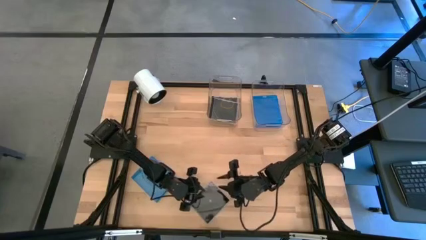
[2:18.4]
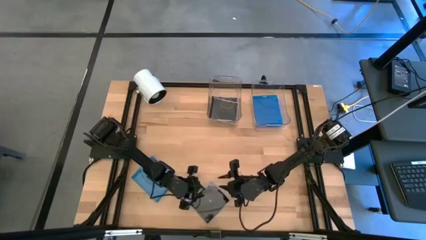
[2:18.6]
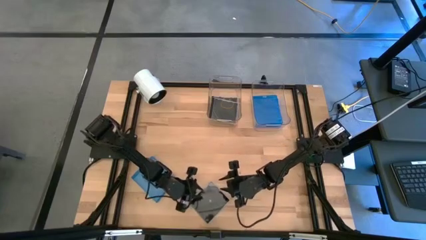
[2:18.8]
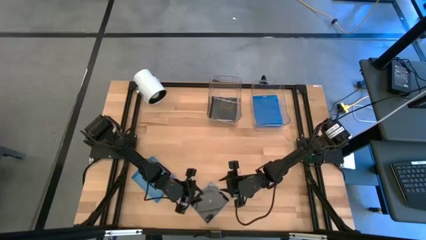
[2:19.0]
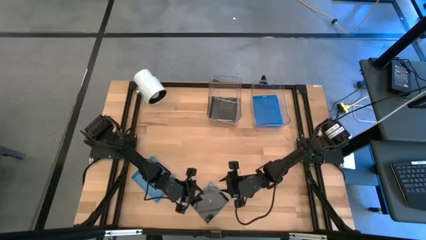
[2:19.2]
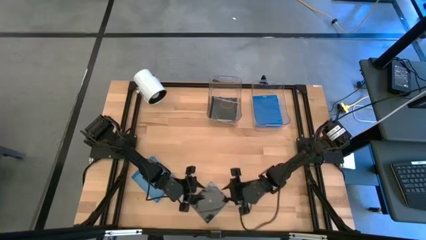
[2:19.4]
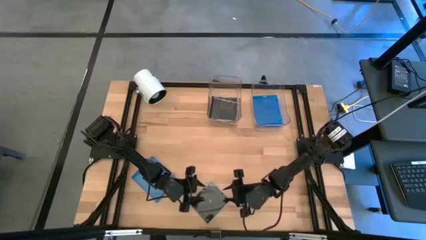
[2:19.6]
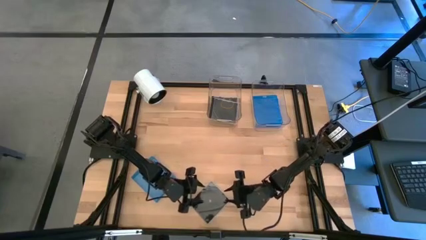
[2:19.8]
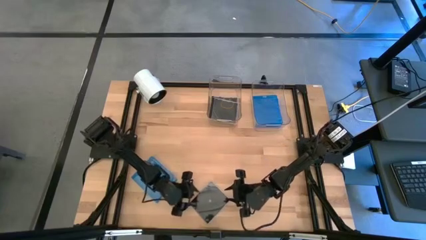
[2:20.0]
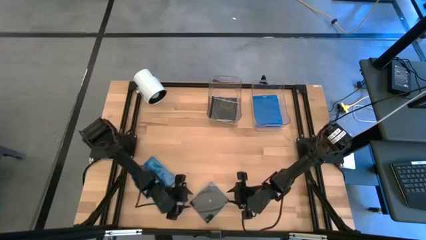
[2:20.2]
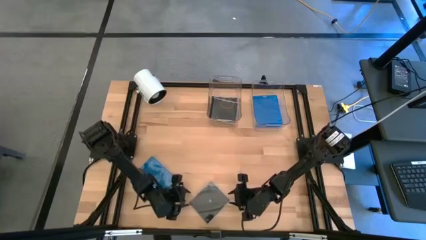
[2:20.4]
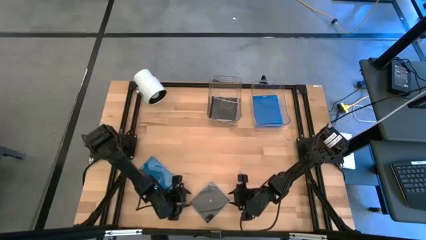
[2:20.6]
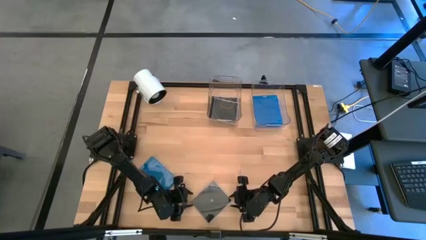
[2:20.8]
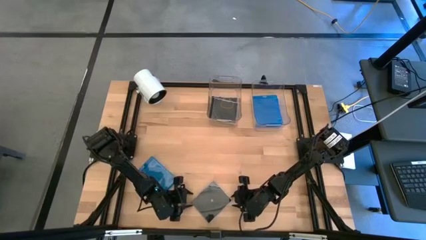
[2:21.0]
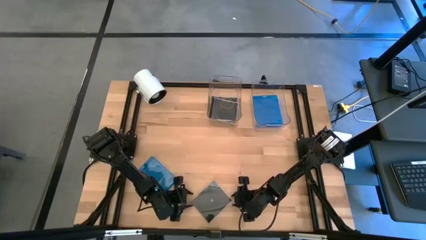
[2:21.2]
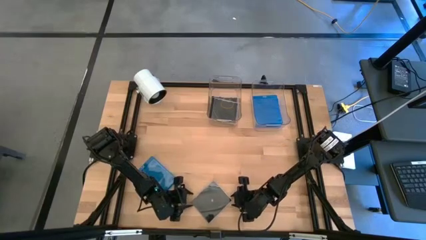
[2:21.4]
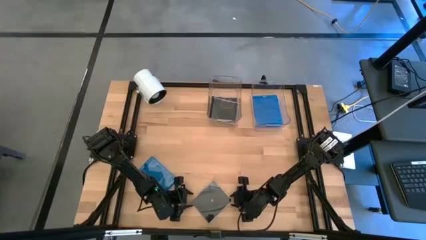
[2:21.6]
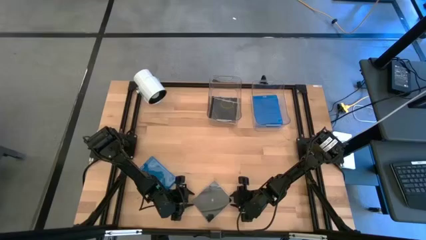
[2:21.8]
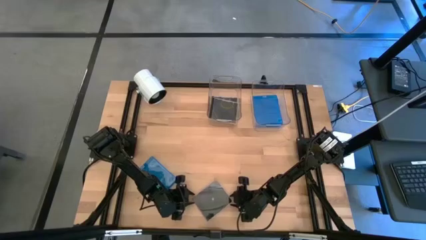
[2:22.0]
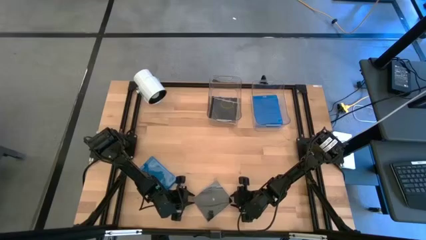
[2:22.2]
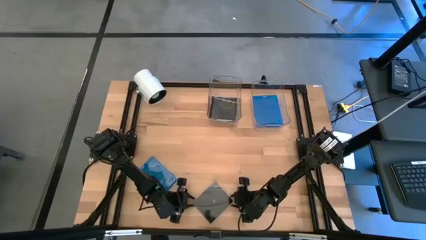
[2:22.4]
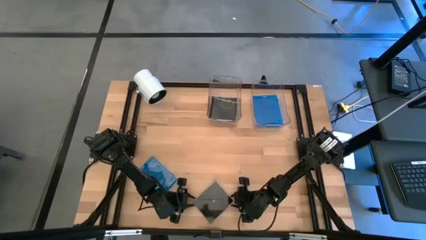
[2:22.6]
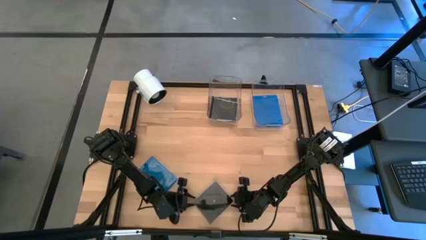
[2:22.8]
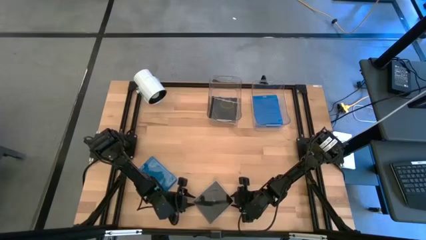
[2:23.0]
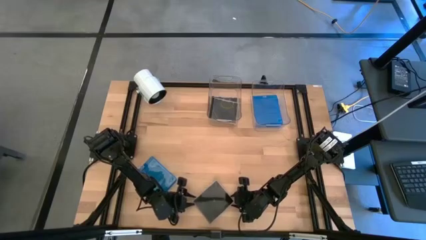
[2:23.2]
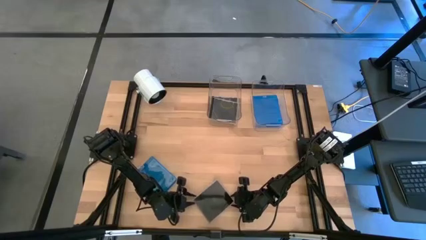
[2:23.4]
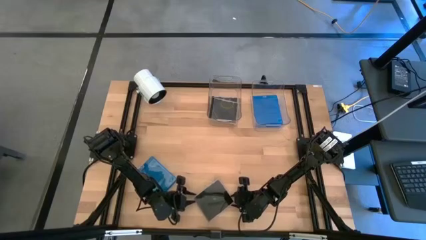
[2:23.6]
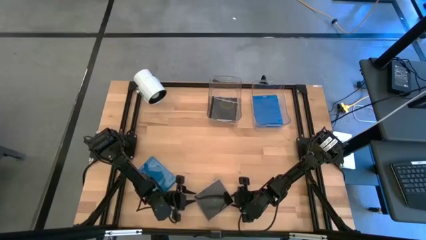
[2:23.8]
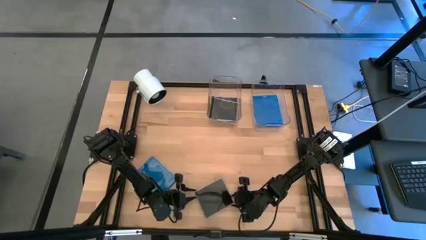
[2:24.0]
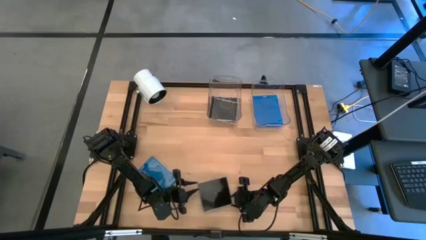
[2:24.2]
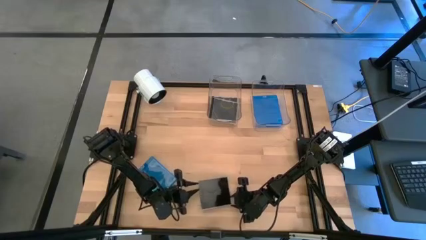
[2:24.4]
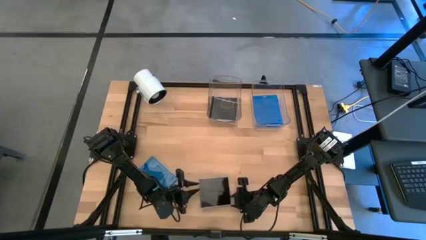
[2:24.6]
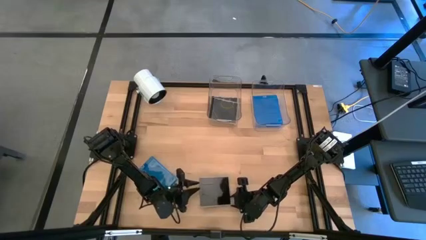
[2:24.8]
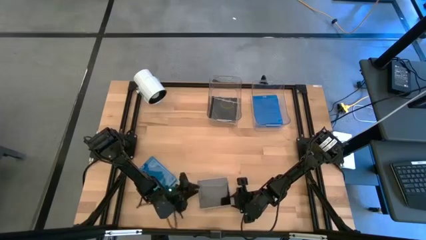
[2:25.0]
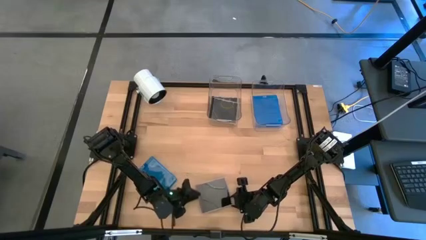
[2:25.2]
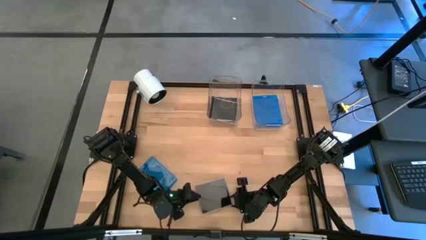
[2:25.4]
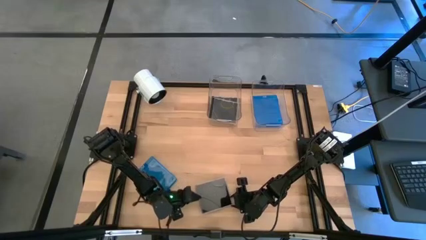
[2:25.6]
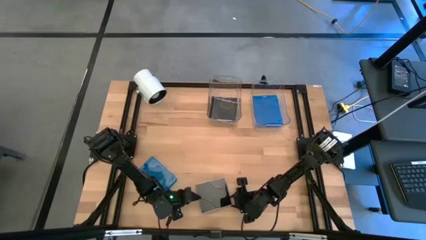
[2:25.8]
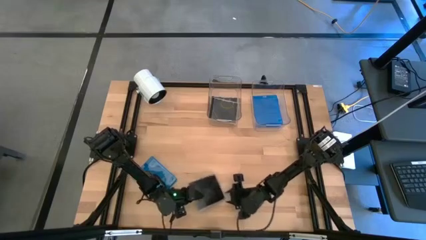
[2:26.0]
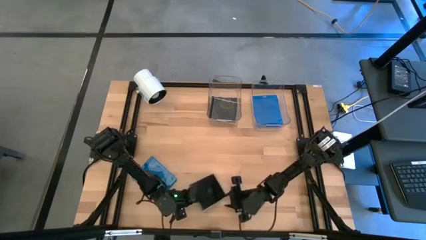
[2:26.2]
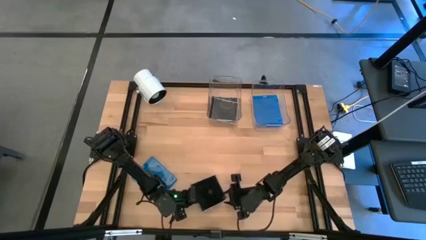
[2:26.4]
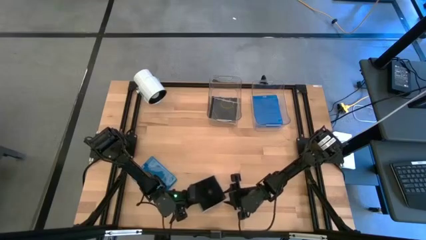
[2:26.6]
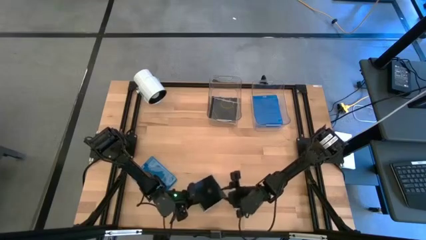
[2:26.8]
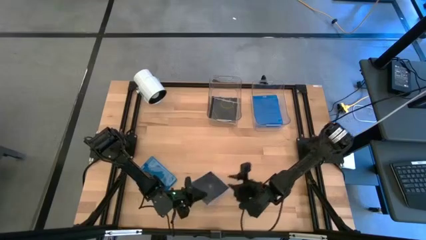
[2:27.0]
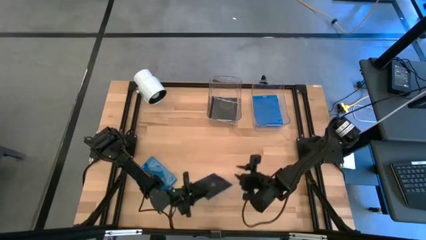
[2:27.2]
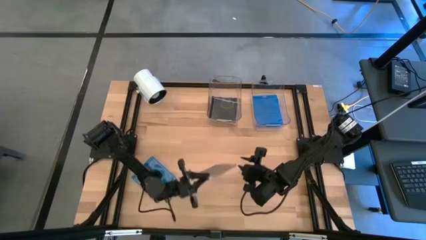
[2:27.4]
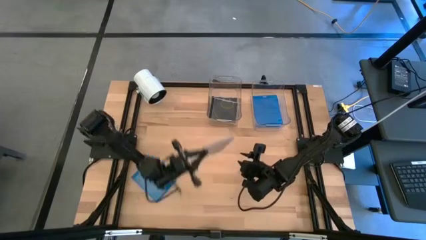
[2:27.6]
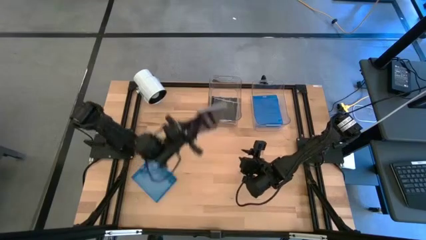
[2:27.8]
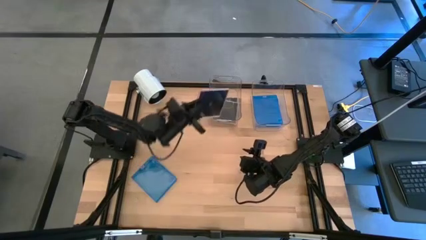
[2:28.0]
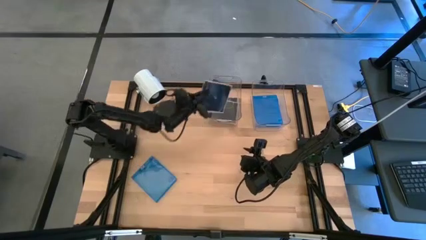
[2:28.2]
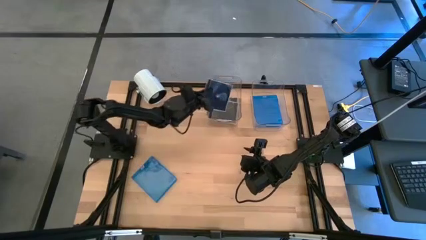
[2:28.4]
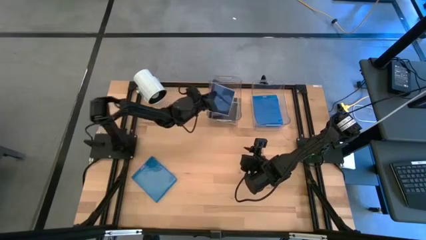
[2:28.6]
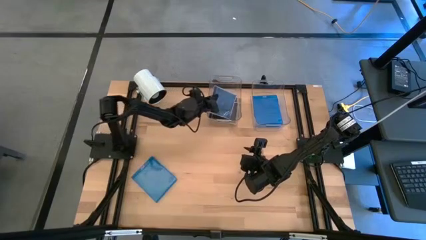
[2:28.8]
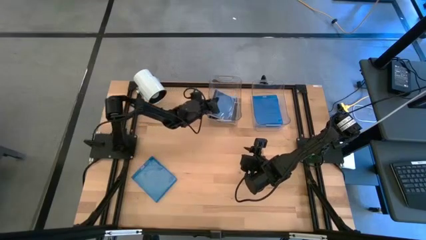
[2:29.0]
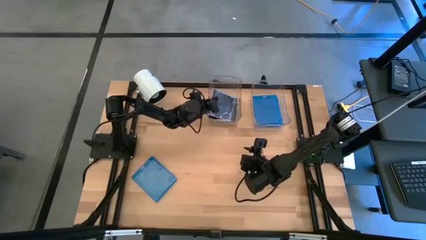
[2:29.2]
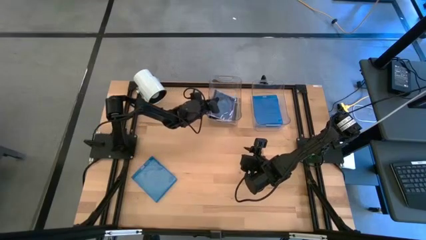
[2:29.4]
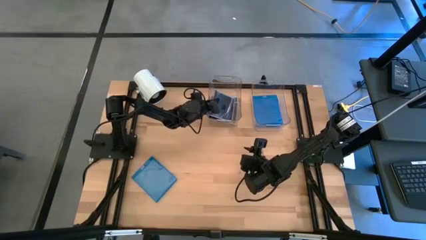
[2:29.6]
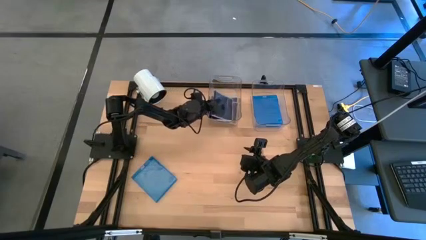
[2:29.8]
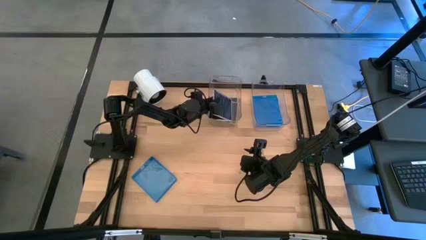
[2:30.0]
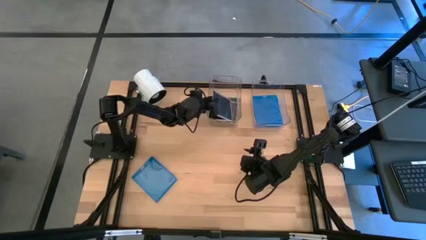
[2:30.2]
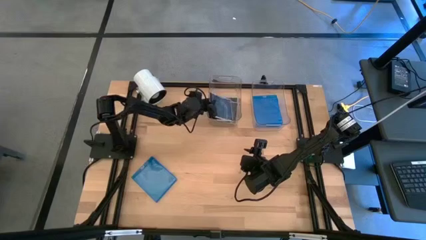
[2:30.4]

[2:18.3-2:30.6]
Task: Pick & place jewel cases by type
Put the black CD case into the left transparent bin

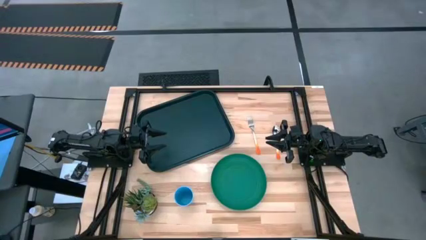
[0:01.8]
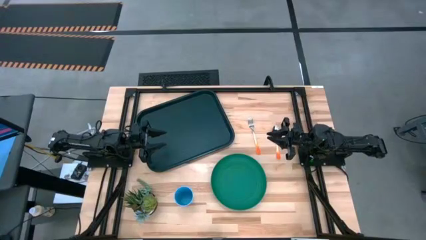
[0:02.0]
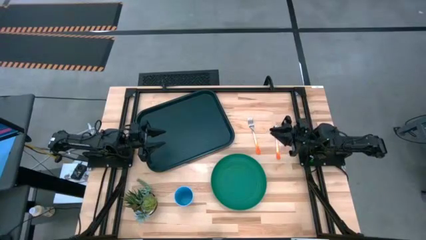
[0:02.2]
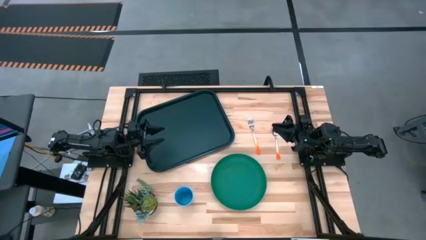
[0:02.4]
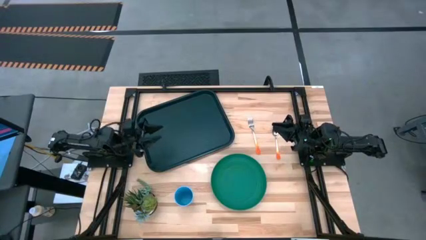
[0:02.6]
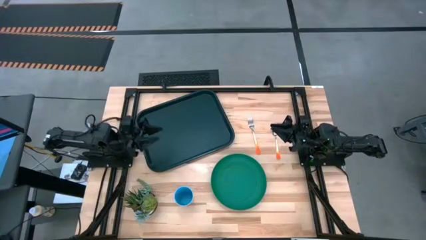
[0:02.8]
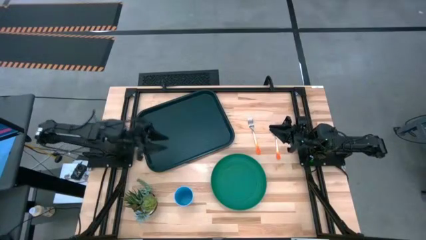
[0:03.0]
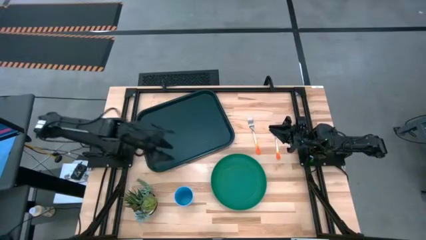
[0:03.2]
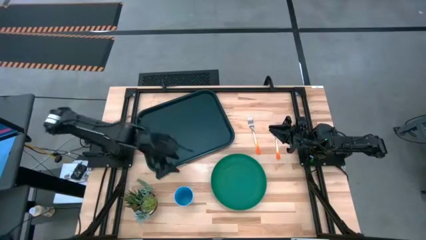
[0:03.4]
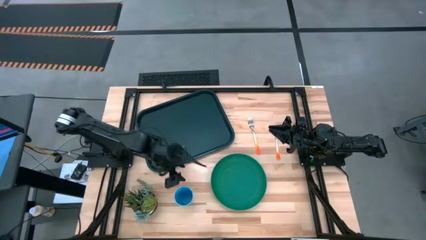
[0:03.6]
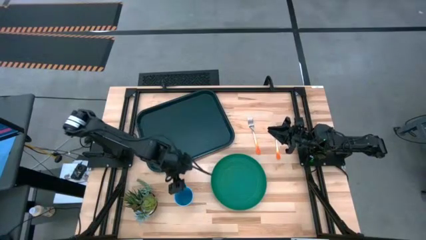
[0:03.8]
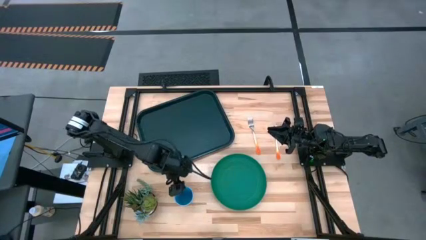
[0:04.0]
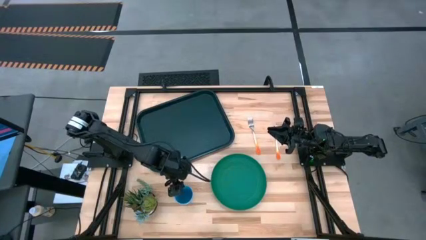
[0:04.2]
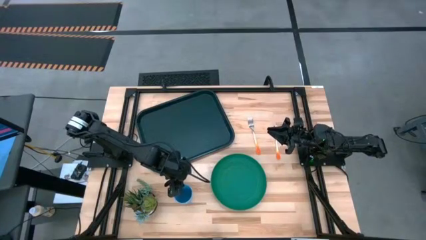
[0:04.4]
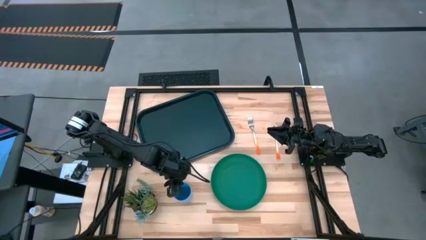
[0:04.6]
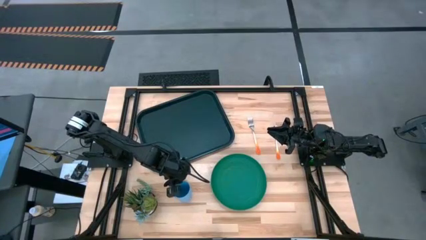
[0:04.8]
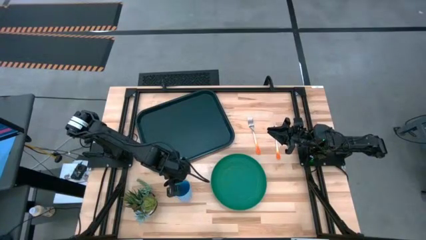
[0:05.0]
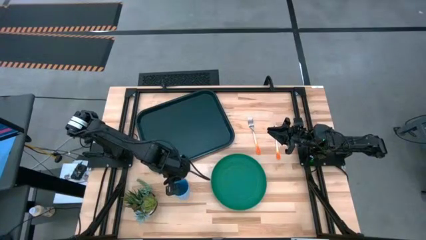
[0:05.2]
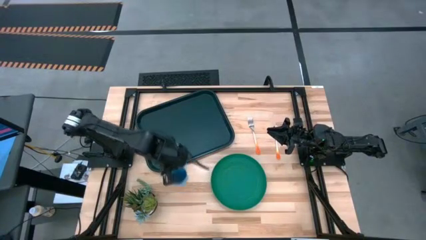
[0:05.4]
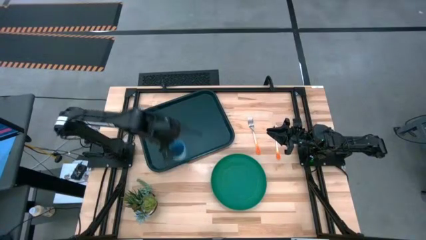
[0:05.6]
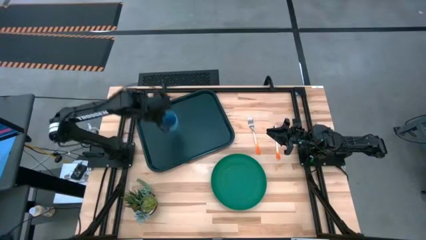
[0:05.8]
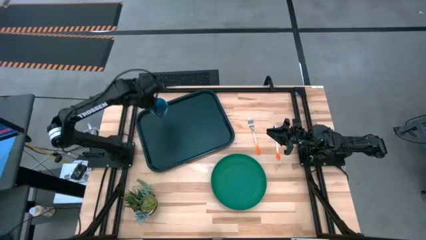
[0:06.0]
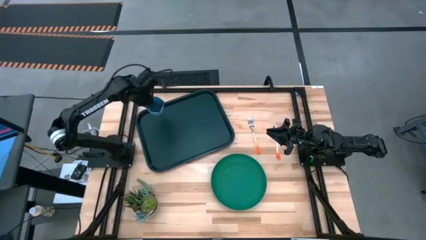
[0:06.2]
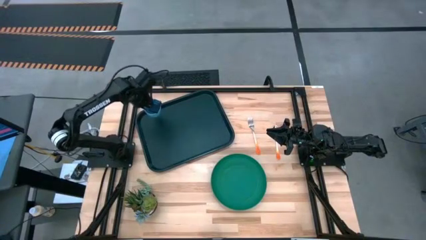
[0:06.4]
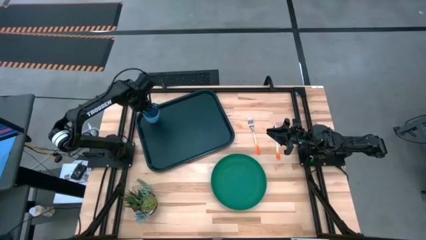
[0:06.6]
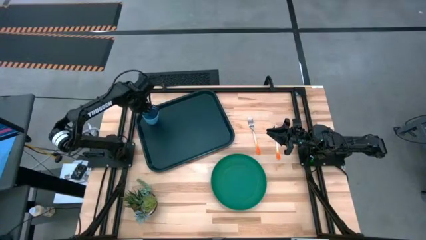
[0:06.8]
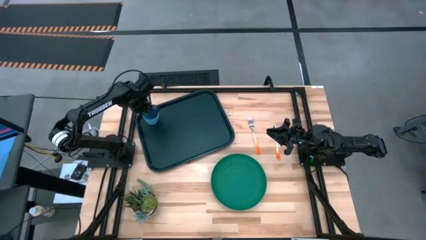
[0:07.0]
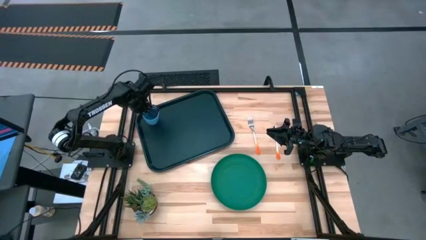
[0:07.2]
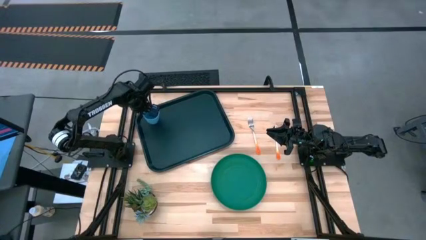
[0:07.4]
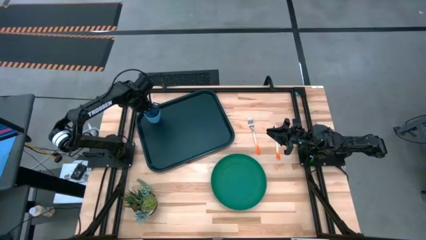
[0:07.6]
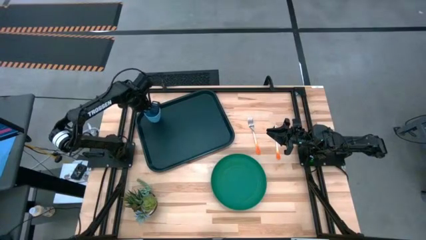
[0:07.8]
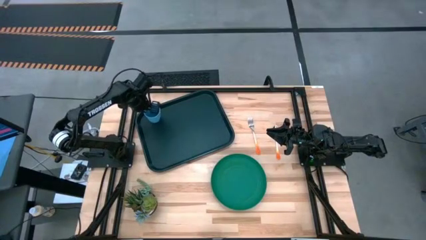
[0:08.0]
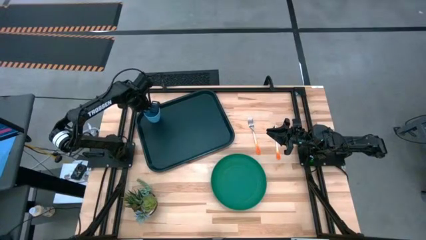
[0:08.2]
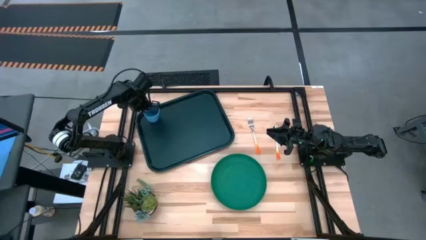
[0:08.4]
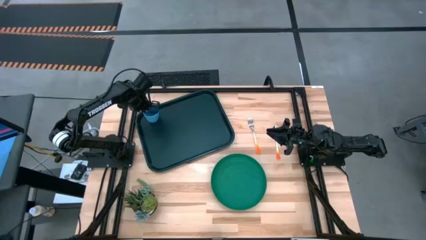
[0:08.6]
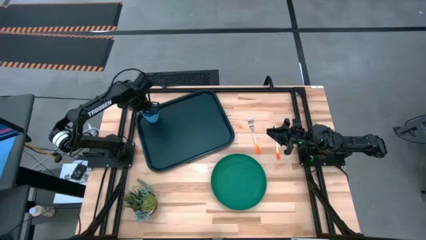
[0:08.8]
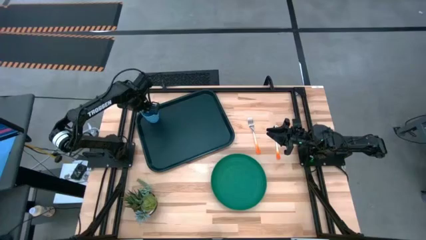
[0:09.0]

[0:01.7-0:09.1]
Task: Pick and place plate/cup/fork/spoon on tray
Put the blue cup on the top left of the black tray
